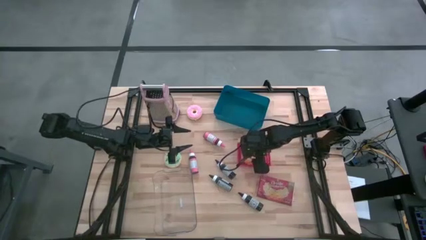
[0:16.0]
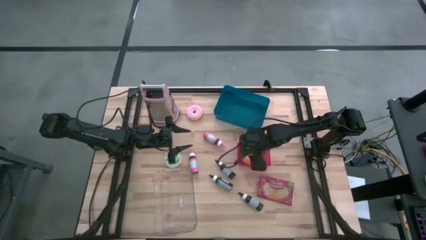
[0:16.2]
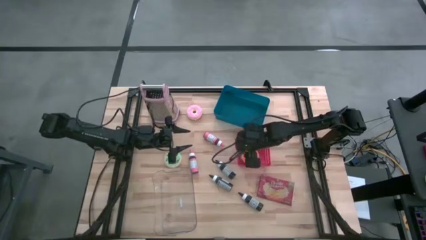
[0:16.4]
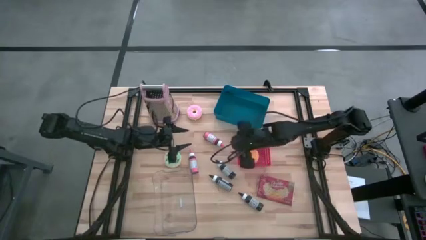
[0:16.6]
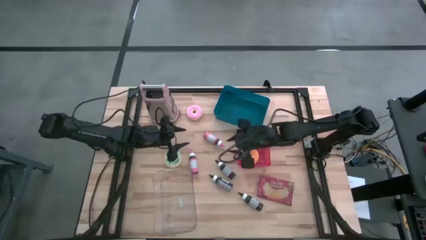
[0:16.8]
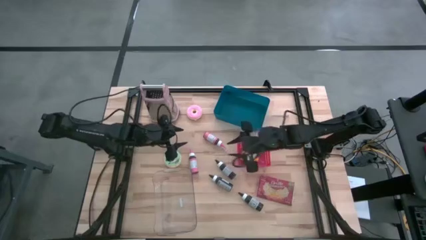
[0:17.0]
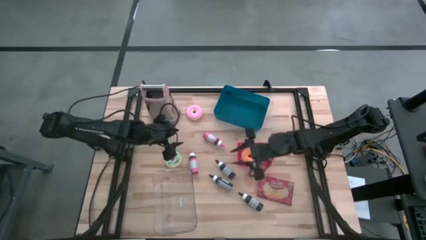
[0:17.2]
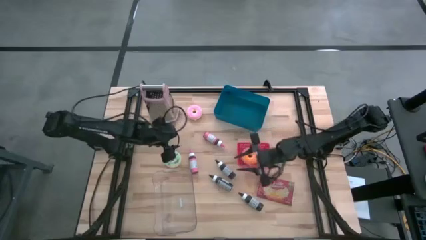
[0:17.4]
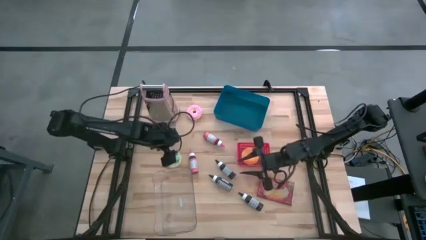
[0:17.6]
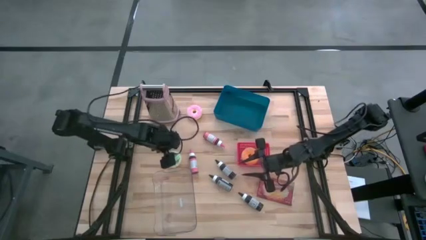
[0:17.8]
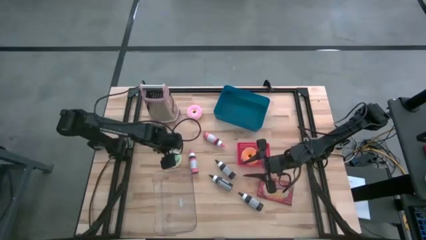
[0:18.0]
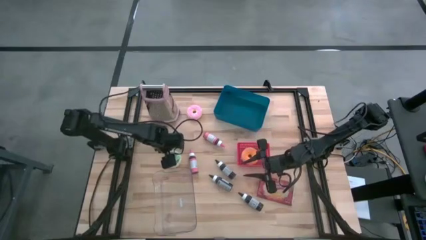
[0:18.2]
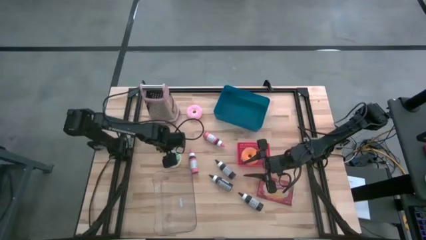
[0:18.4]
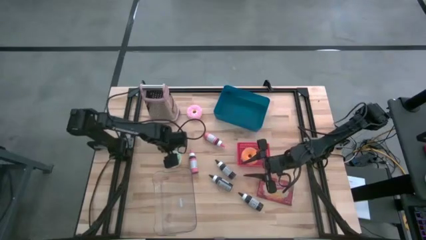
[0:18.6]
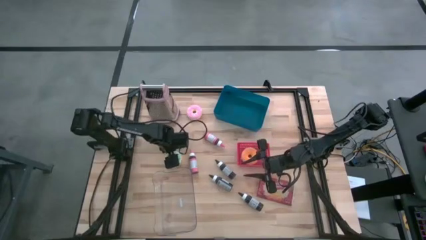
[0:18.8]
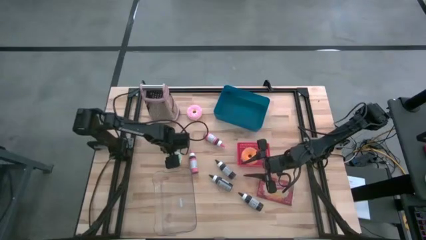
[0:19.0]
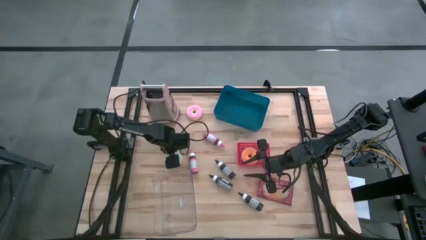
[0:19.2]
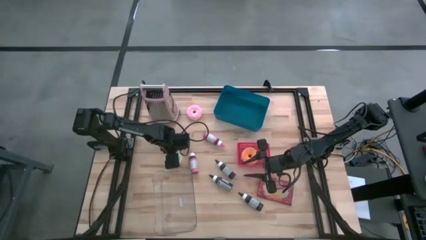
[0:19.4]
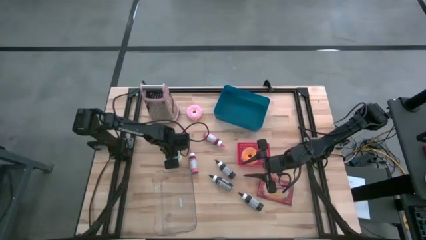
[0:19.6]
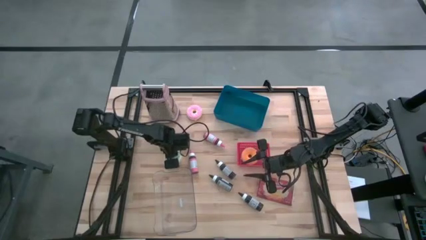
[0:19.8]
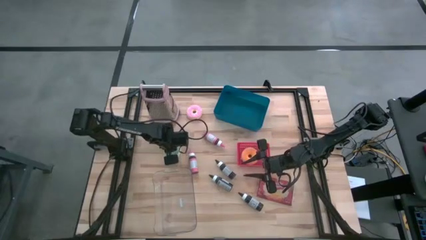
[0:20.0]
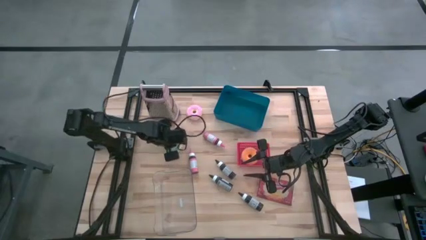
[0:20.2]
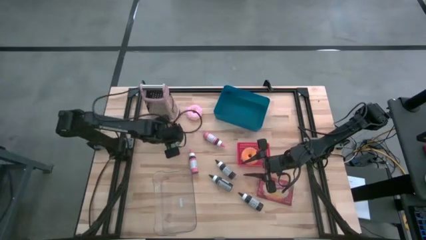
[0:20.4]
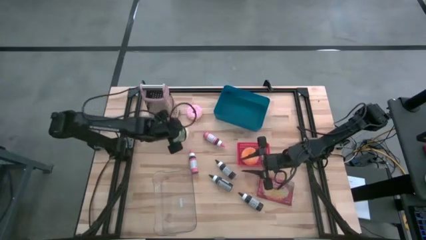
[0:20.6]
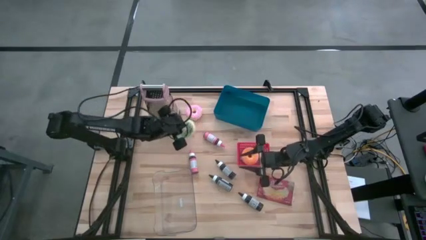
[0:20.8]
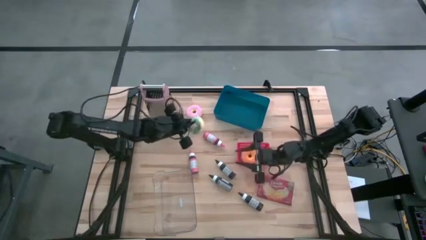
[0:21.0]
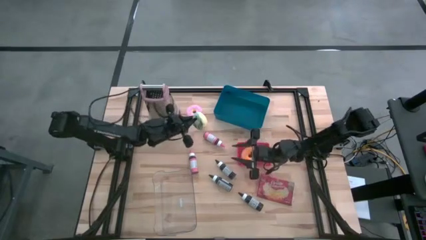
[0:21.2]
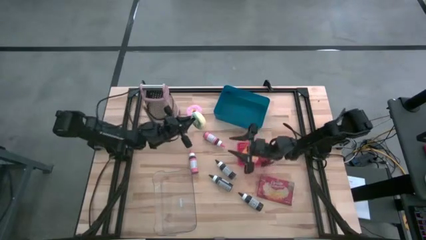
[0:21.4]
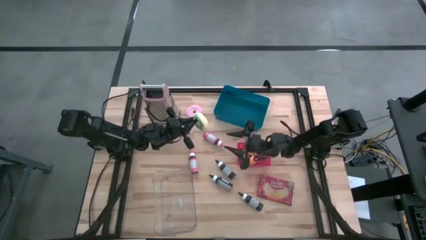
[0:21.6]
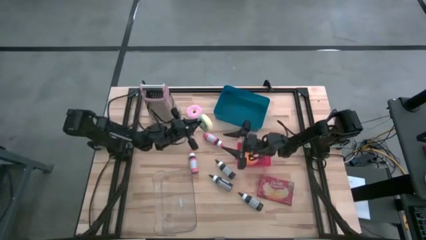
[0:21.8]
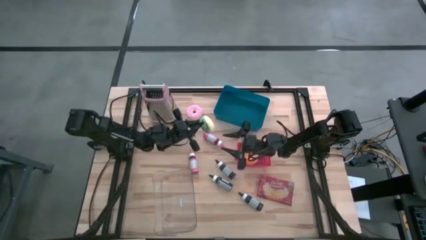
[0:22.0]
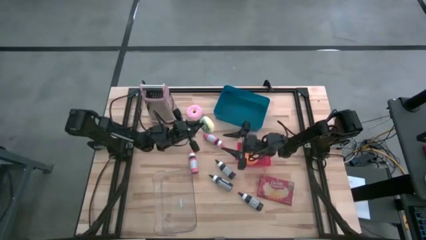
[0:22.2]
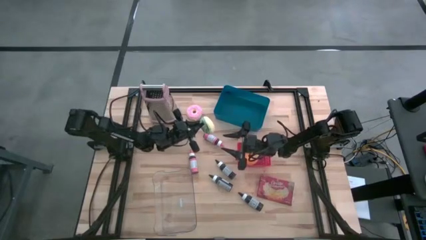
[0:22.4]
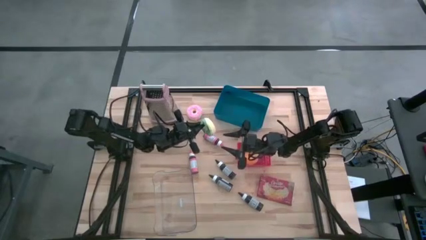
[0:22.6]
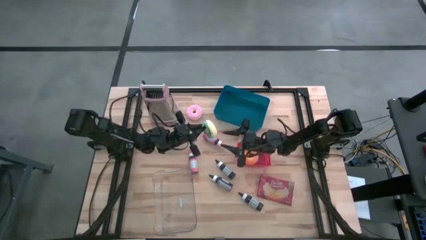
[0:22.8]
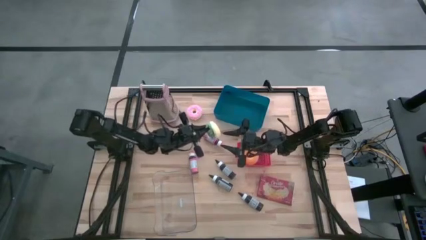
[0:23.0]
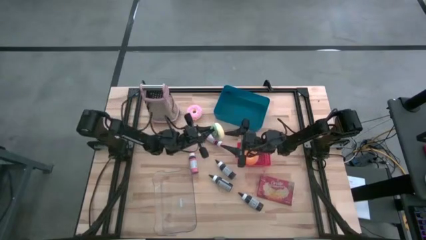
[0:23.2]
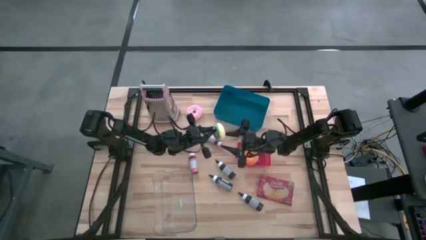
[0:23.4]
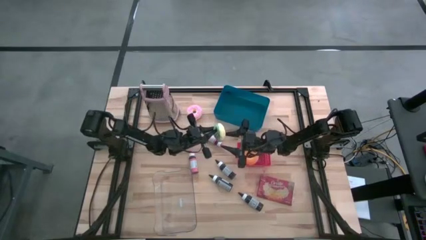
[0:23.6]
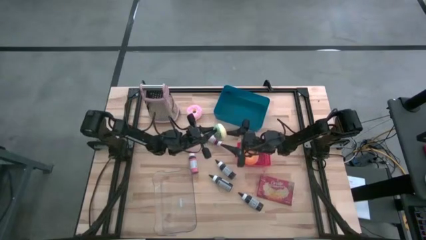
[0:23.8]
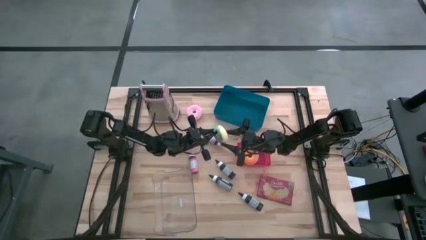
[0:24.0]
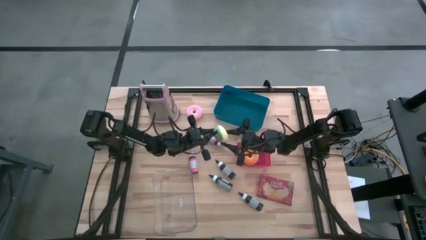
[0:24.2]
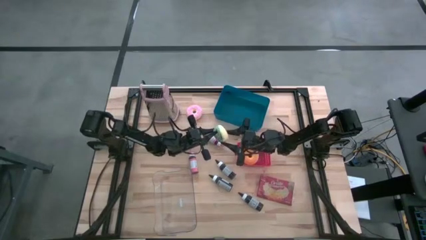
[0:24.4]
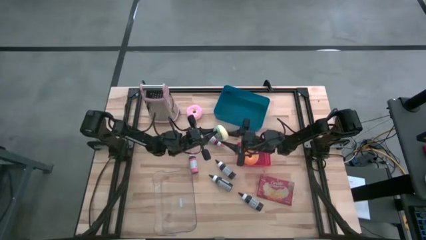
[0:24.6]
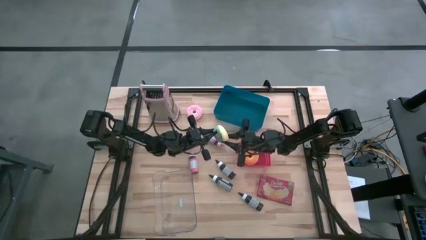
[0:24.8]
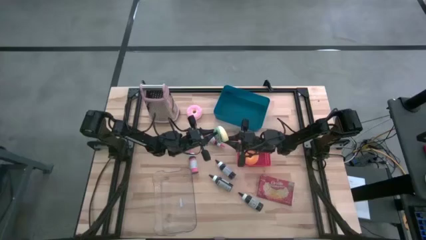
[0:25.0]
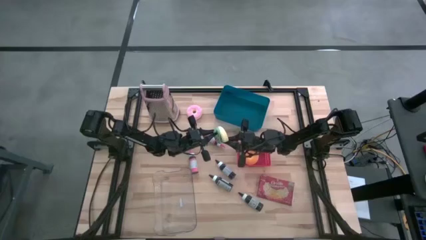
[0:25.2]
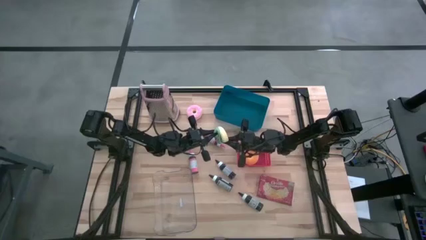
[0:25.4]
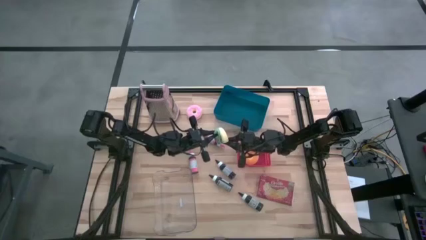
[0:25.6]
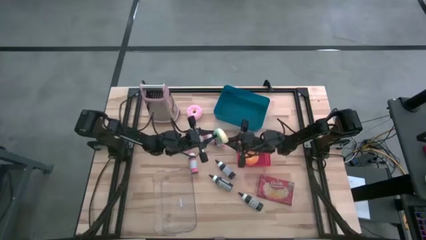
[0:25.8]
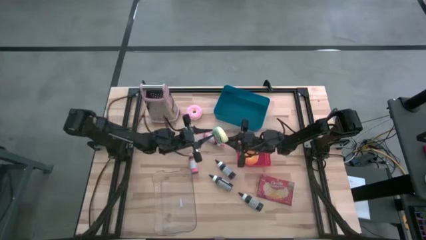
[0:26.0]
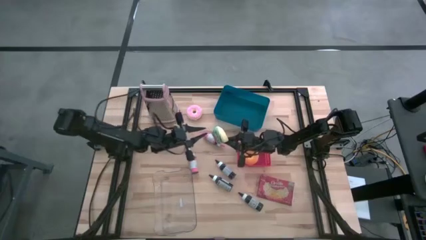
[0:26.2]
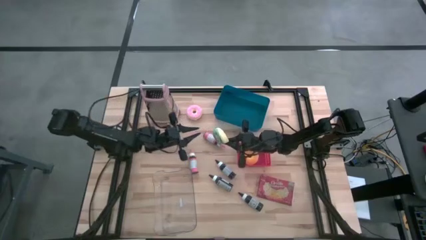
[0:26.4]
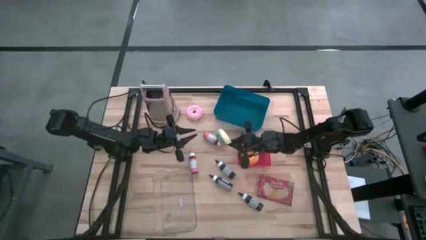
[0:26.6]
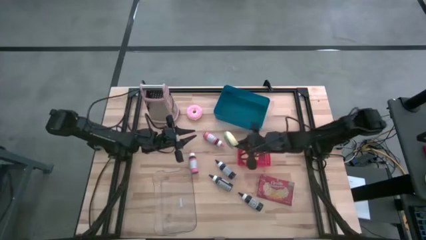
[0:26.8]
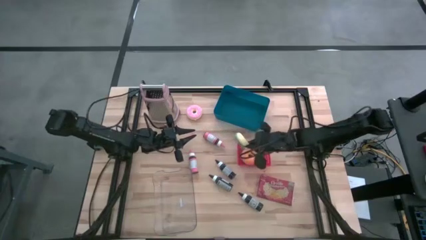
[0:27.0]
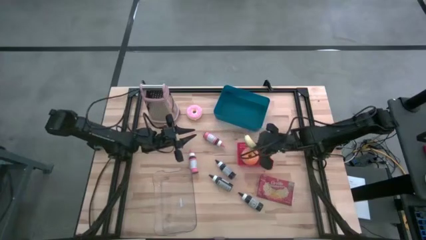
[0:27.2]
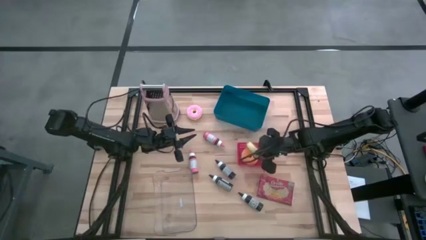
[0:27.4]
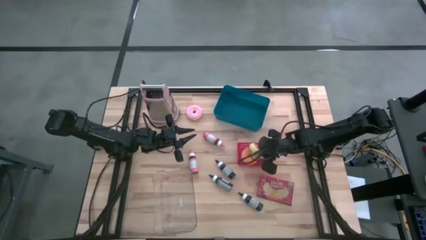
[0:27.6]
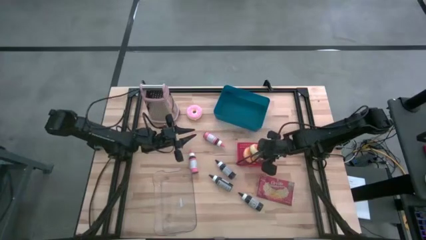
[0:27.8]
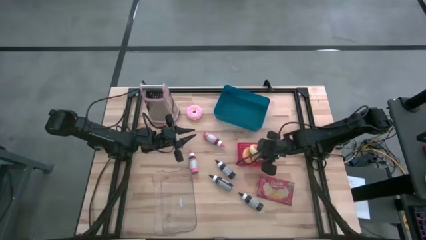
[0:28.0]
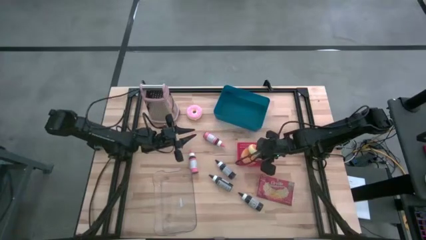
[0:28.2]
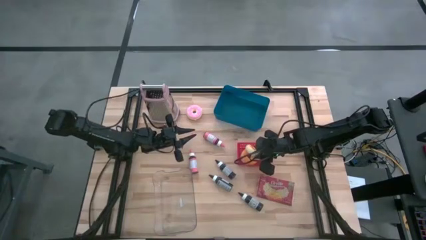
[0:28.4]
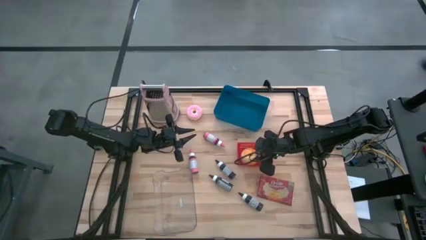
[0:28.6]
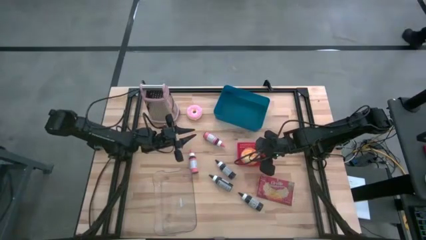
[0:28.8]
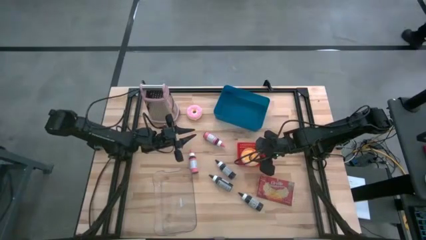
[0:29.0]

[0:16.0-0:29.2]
Task: Pick & Place Food Item
Put the green donut into the red basket
